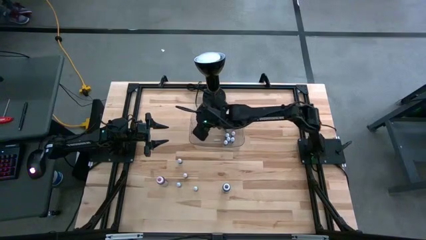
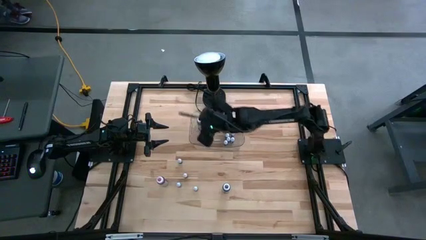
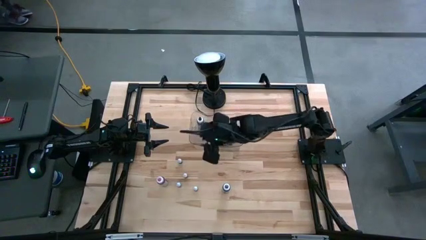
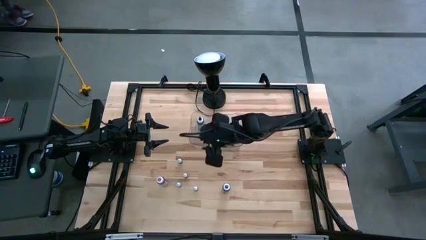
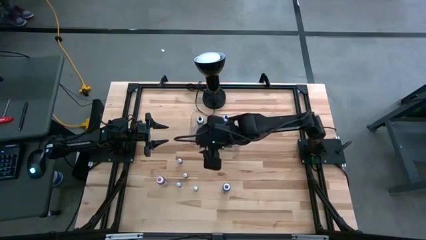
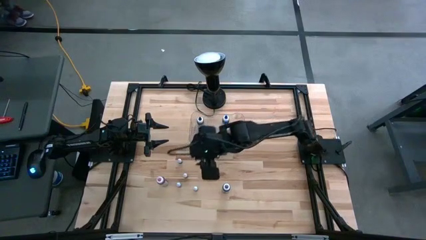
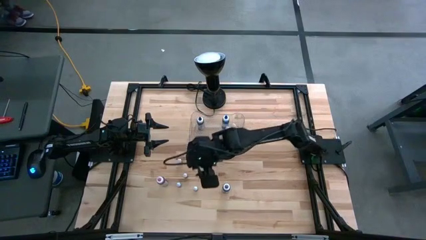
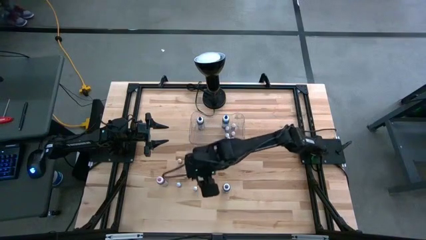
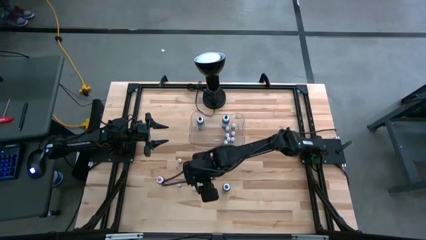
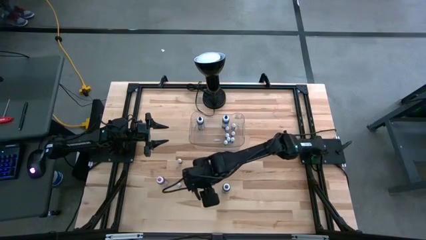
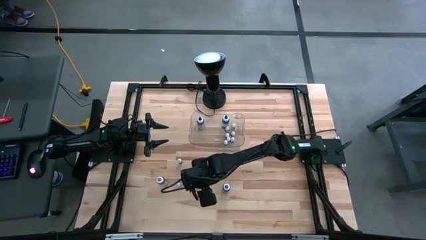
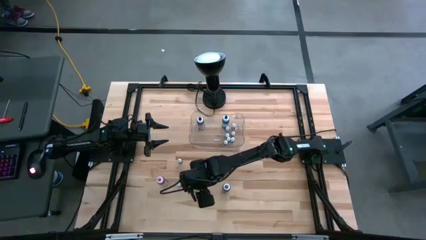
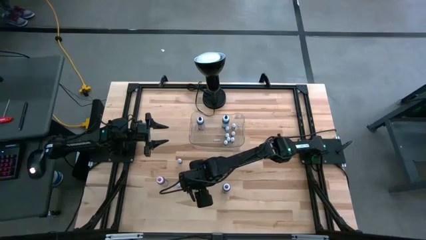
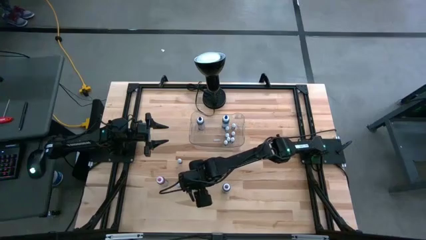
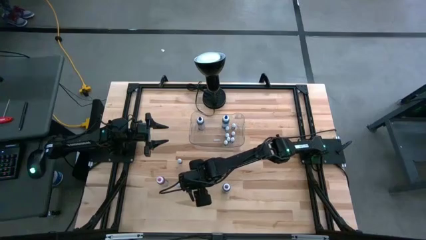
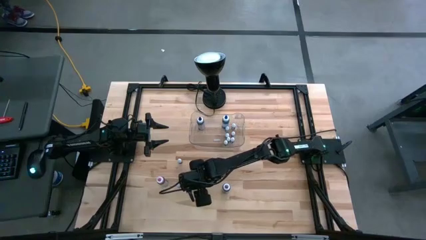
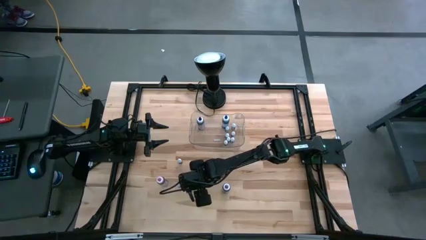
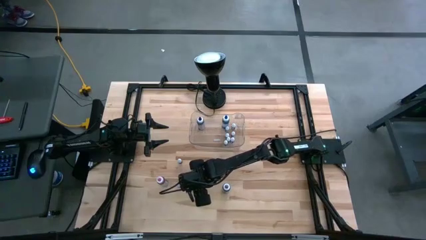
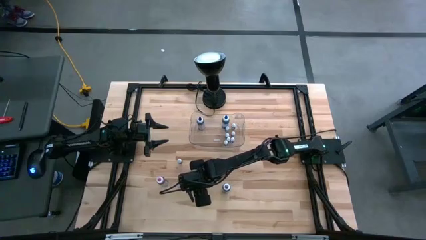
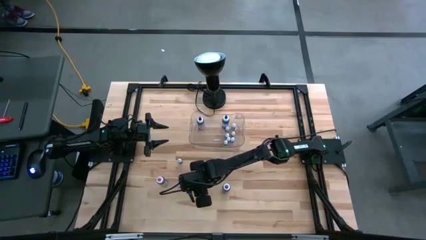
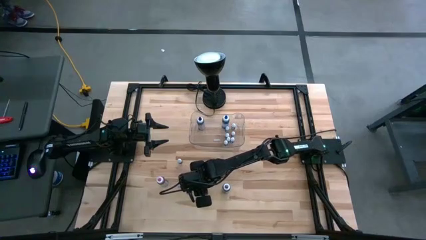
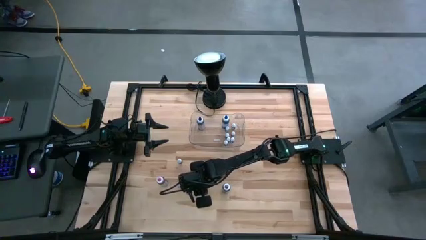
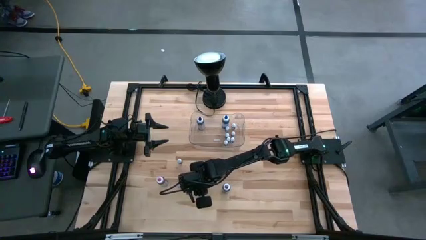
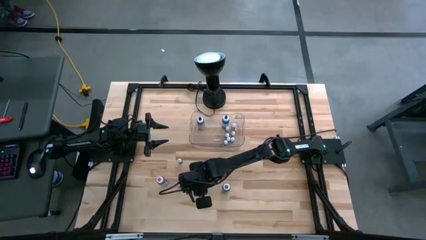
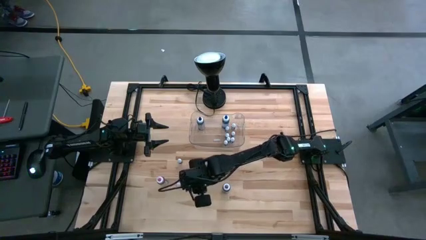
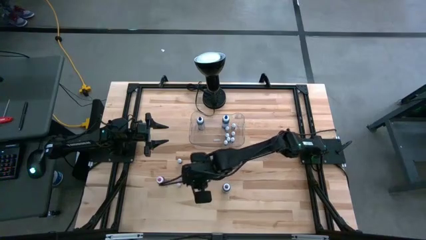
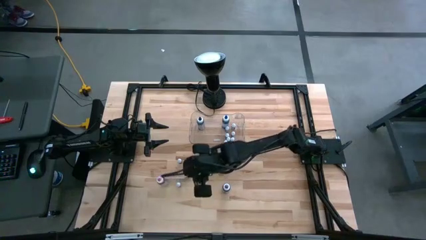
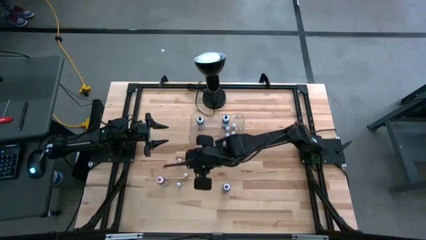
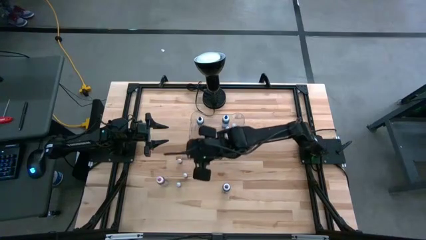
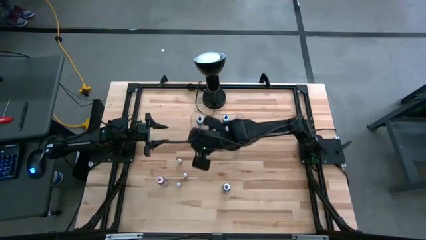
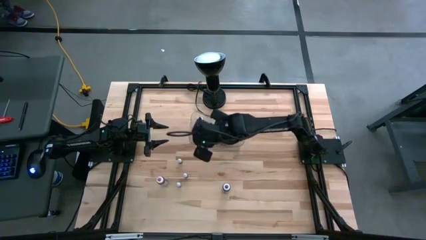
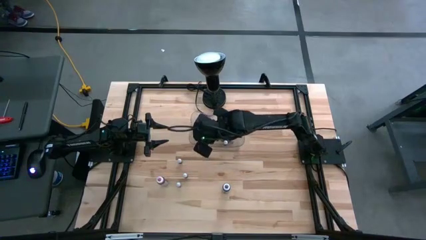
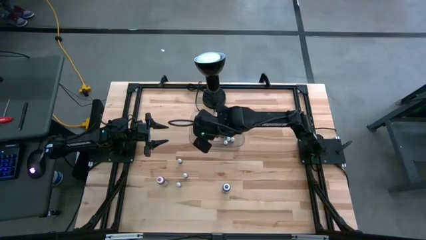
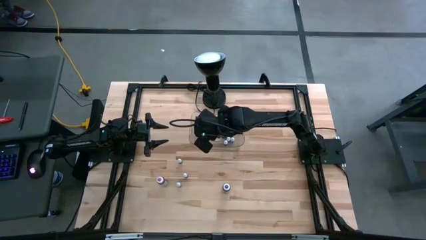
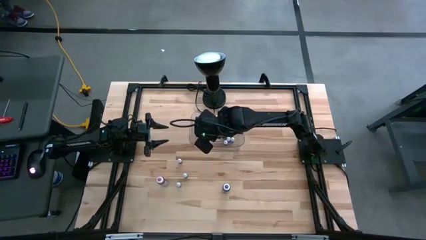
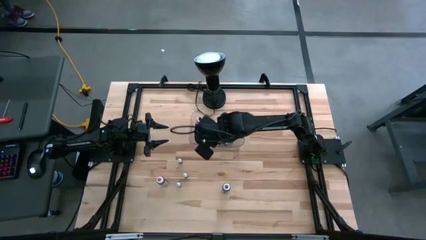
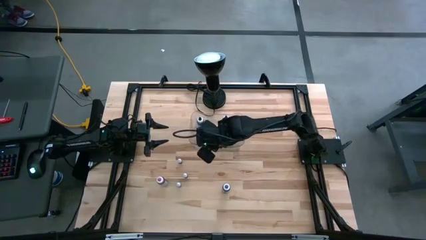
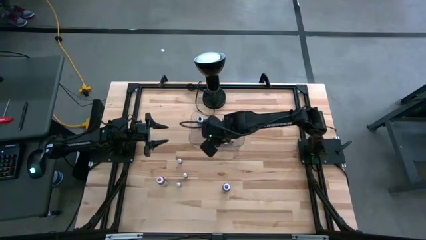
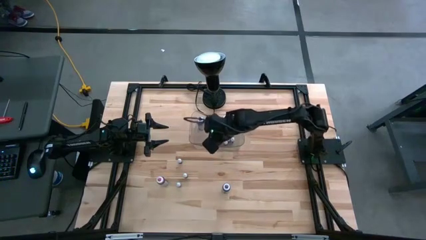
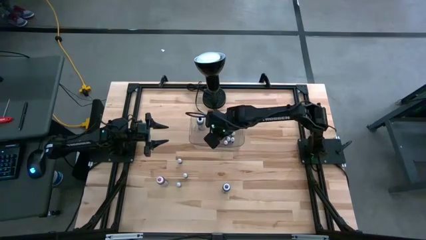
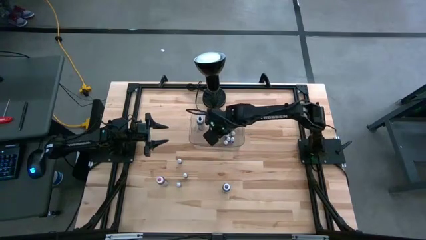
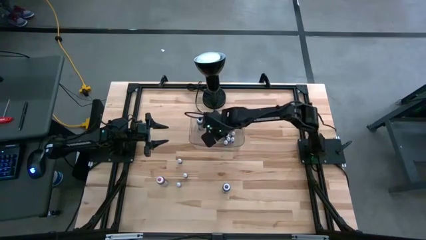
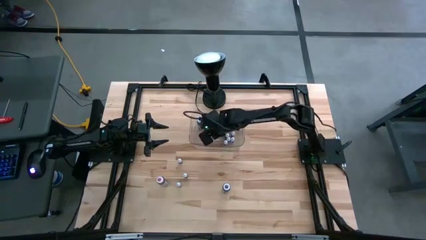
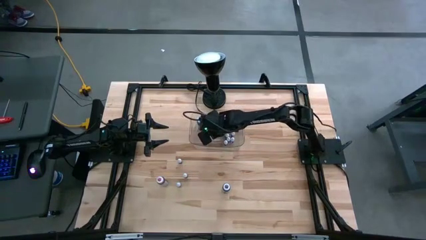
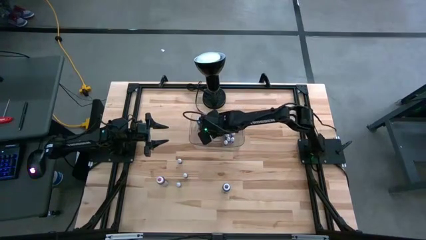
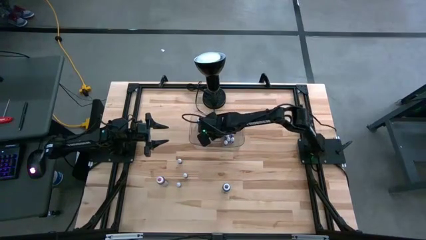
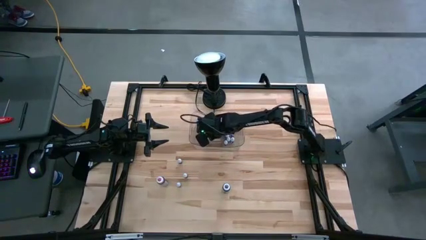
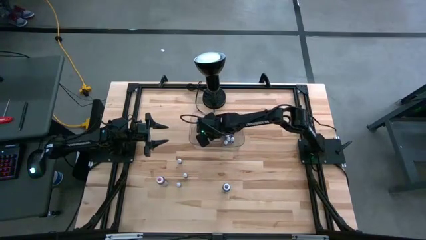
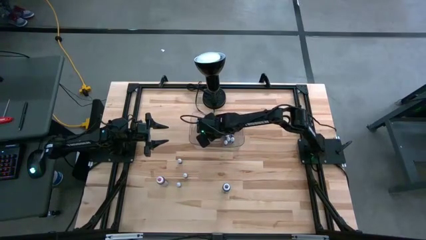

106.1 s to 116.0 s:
Task: Pick & Place food coloring
Put the brown food coloring bottle into the transparent bin

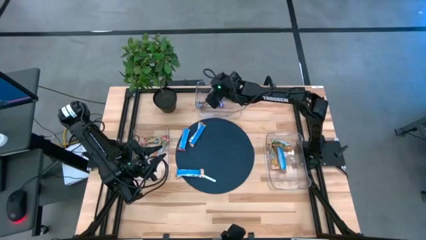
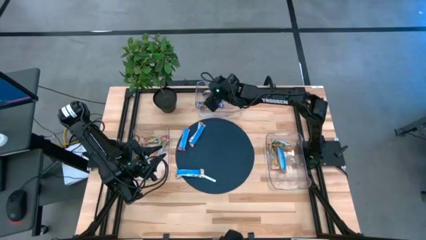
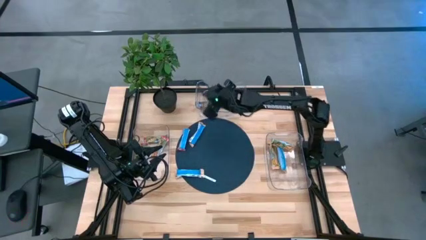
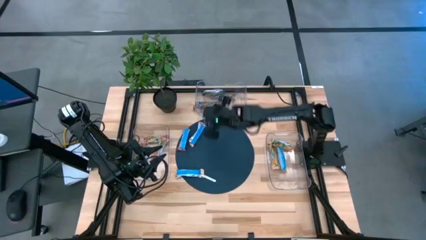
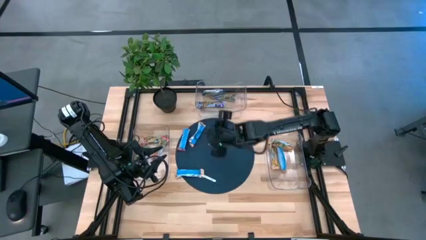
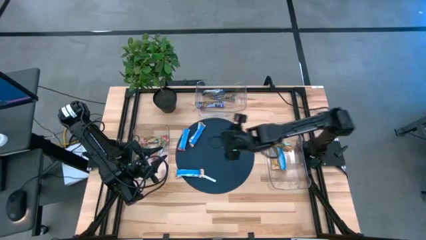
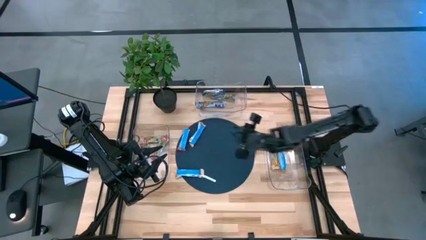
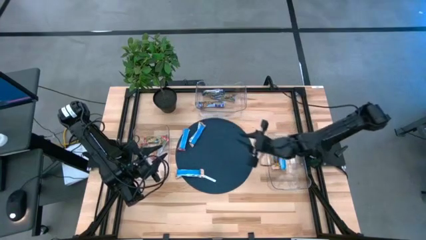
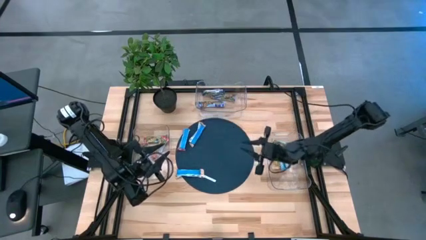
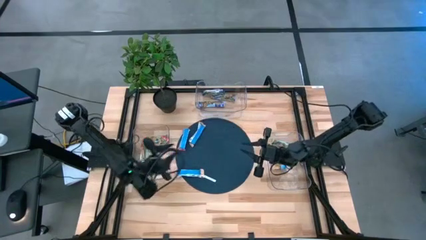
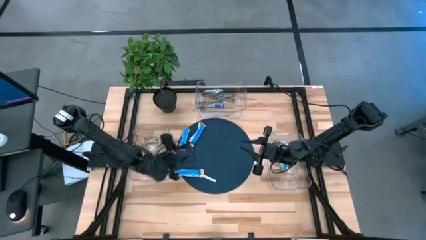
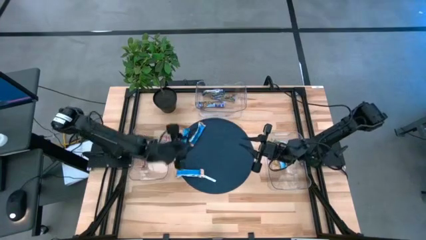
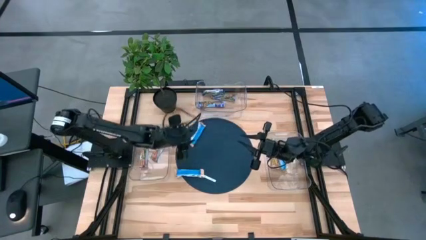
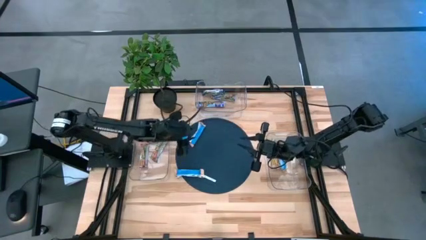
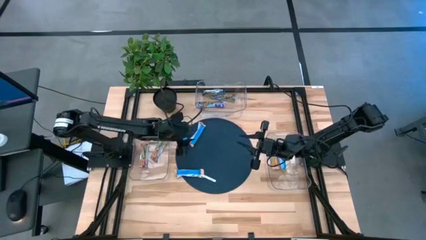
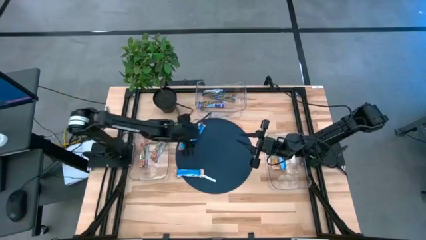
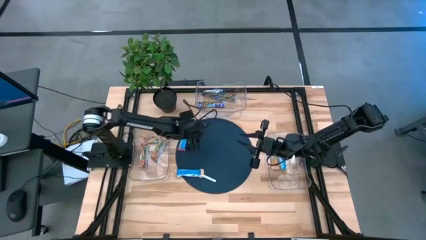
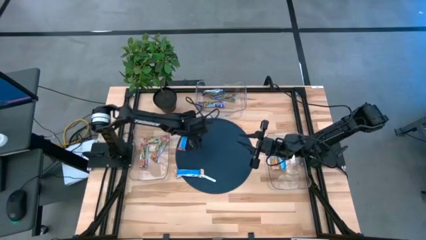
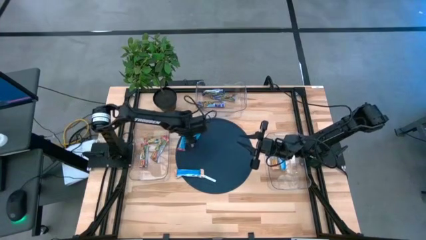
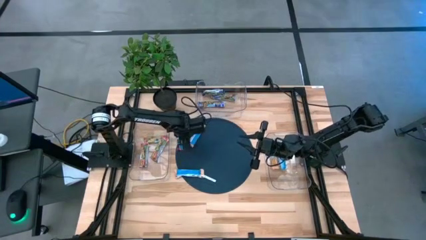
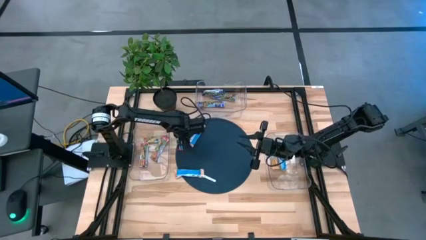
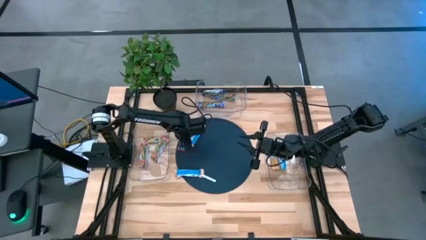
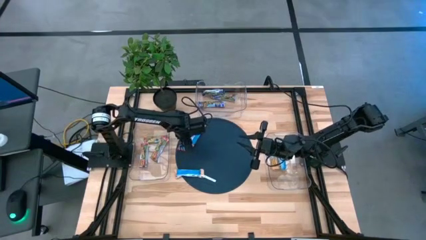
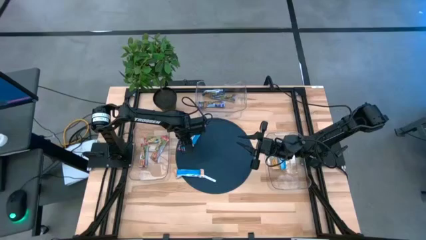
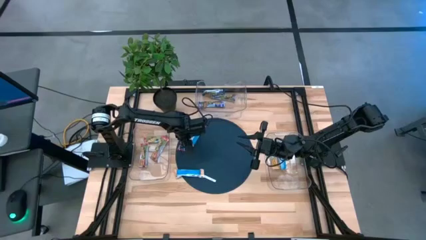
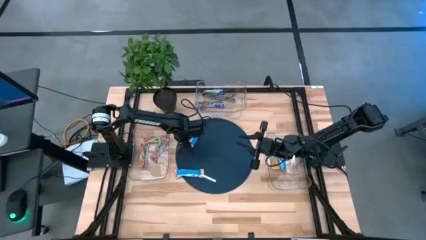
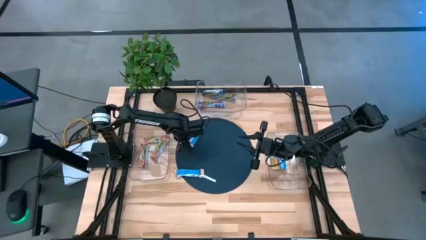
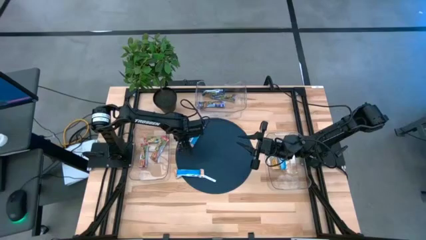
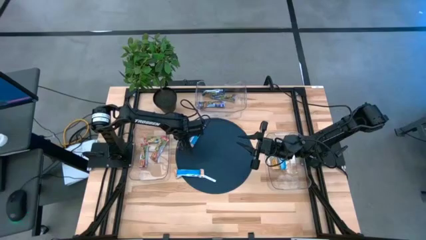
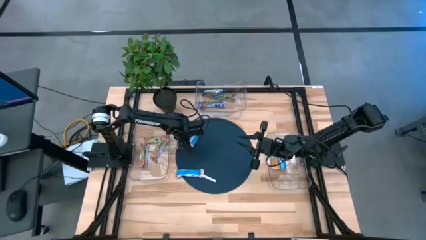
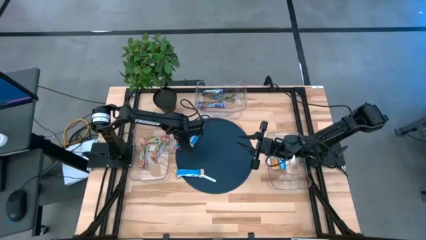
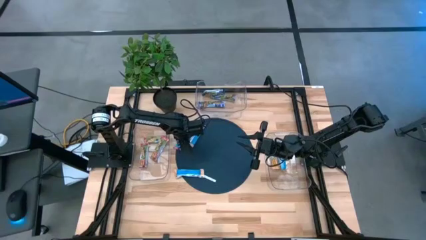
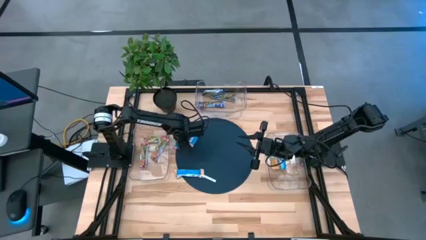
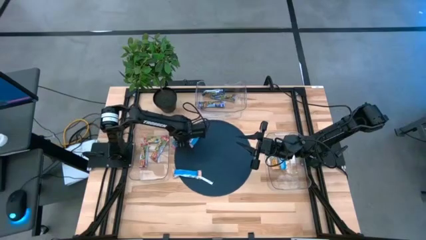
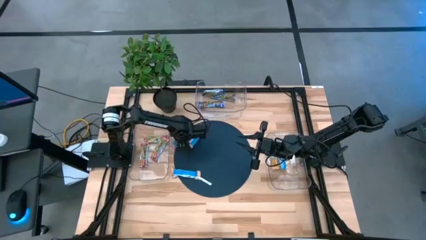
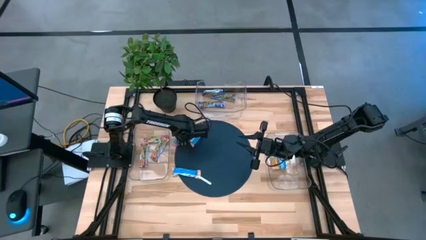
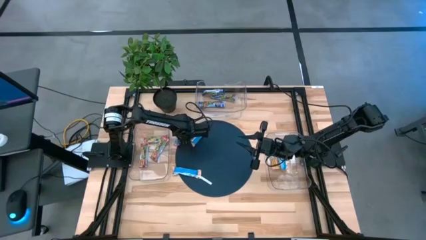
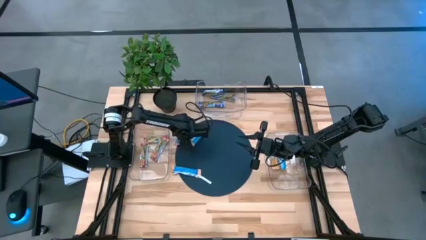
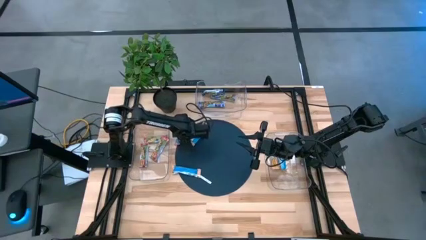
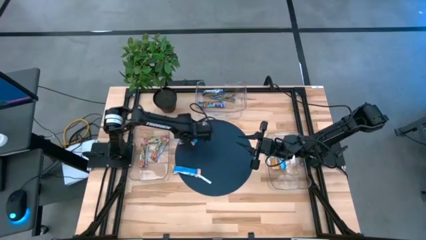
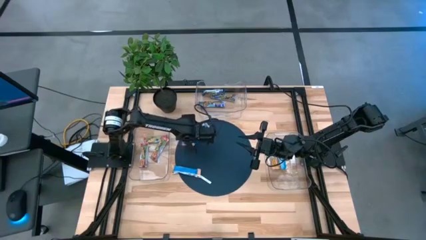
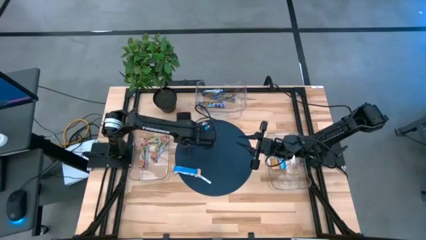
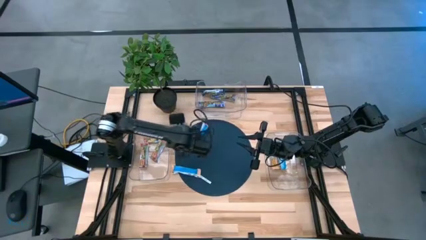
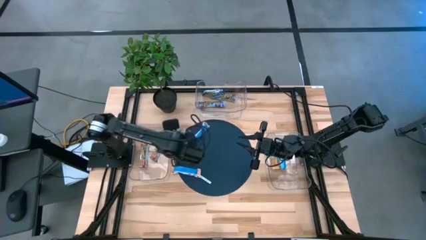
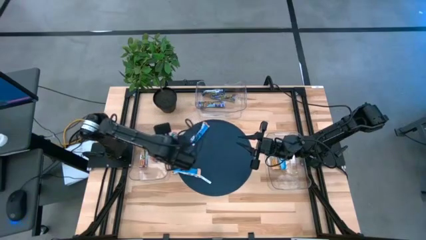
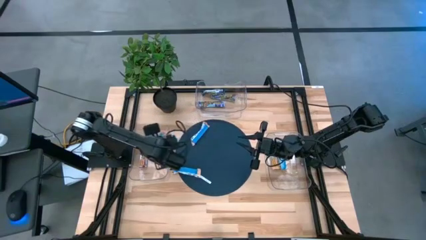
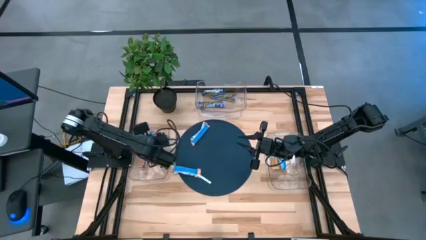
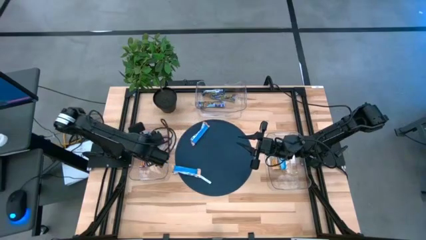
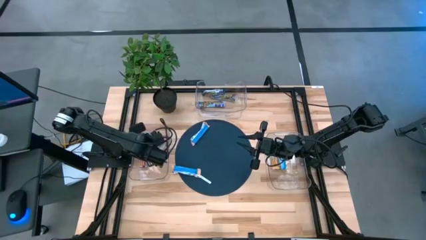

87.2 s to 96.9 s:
Task: Pick and place Granola Bars by type
Put the red granola bar into the left transparent bin
